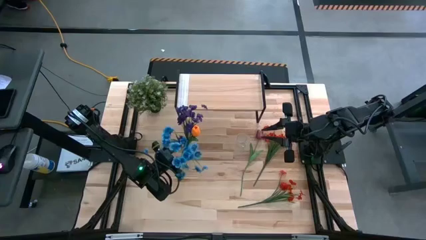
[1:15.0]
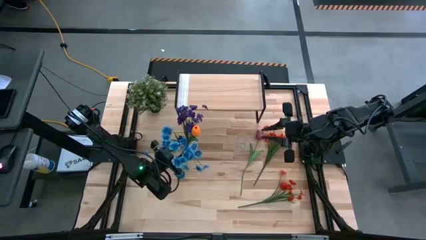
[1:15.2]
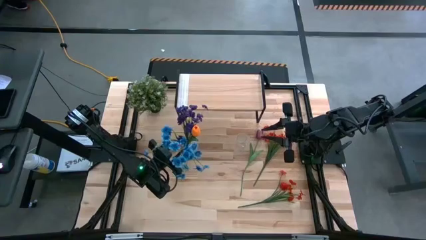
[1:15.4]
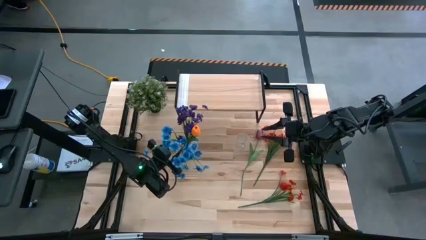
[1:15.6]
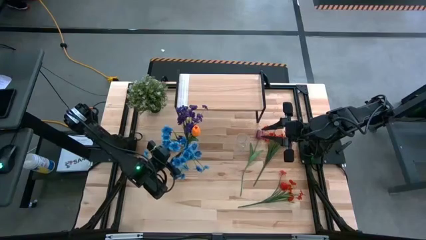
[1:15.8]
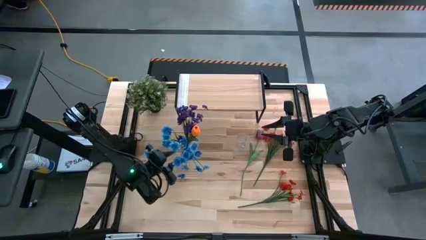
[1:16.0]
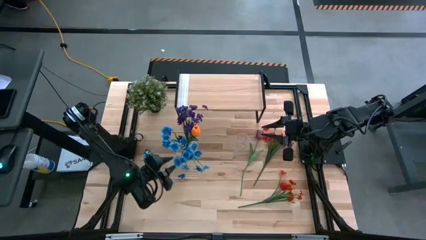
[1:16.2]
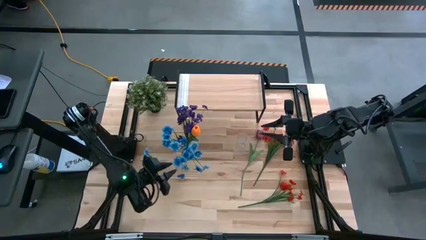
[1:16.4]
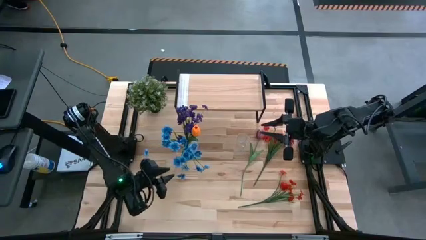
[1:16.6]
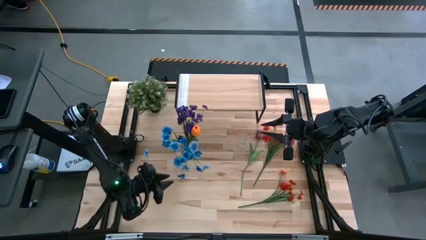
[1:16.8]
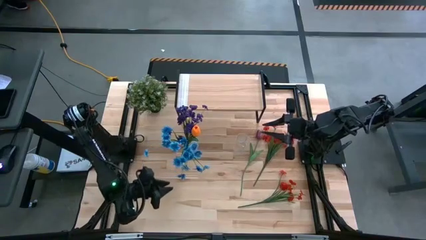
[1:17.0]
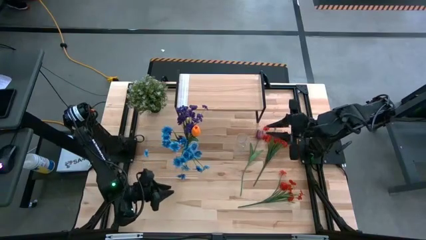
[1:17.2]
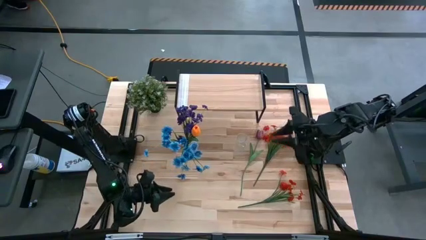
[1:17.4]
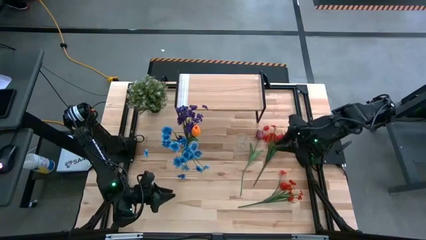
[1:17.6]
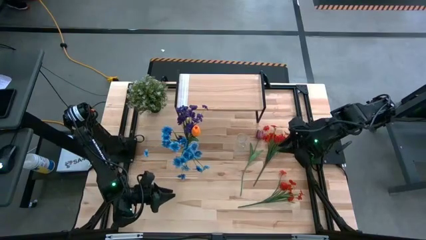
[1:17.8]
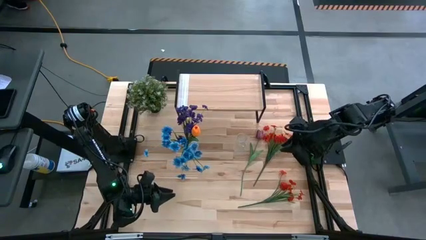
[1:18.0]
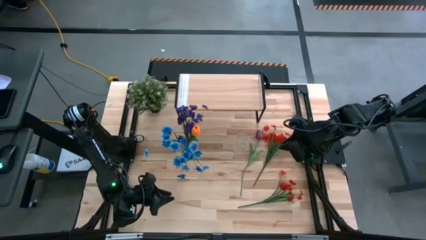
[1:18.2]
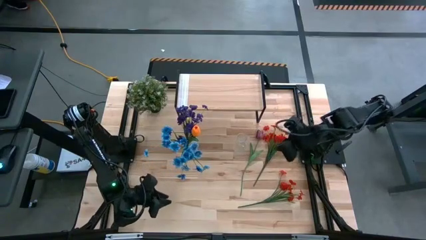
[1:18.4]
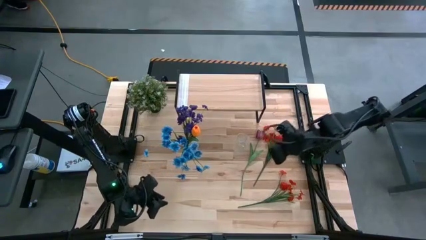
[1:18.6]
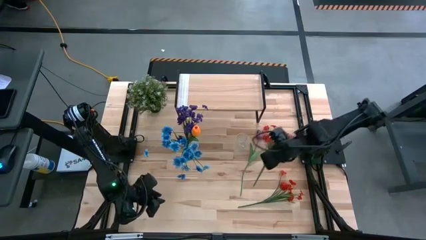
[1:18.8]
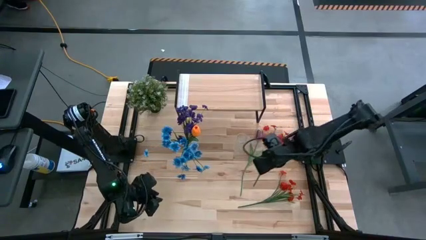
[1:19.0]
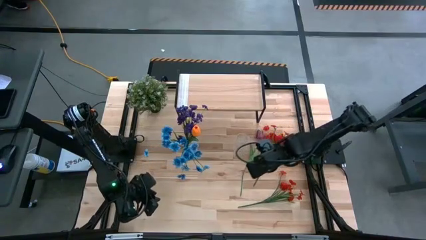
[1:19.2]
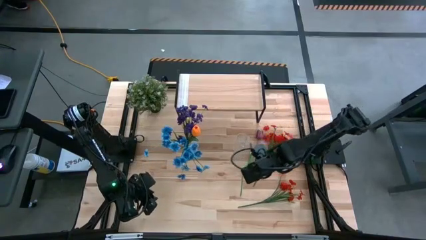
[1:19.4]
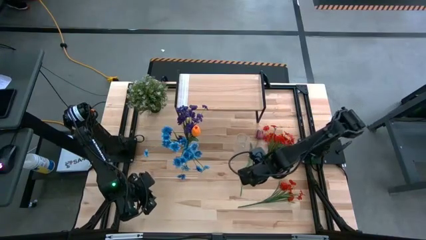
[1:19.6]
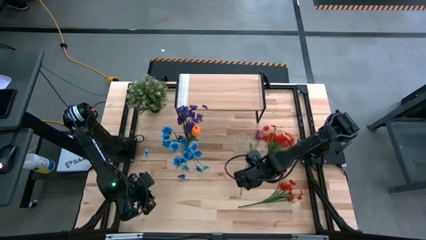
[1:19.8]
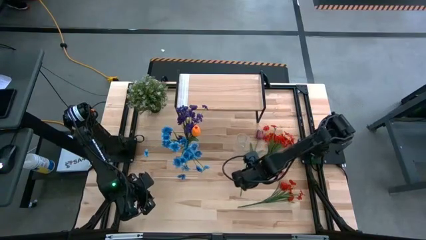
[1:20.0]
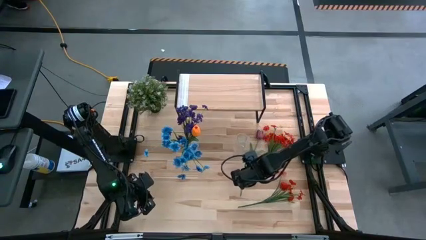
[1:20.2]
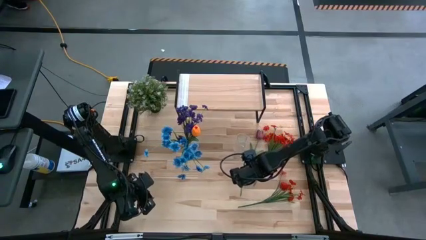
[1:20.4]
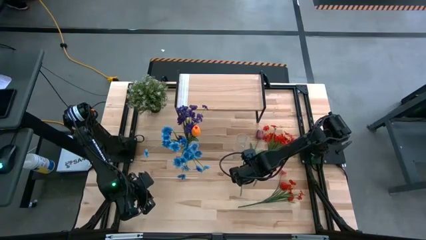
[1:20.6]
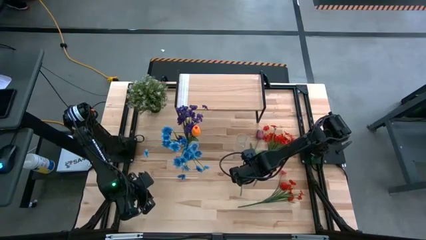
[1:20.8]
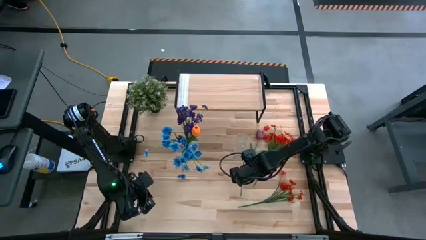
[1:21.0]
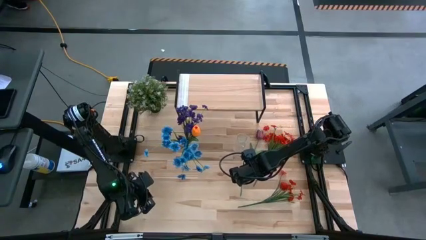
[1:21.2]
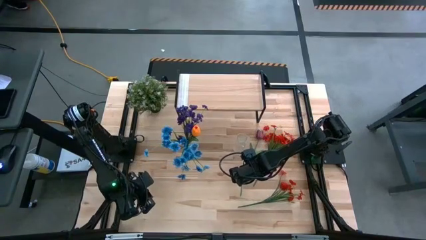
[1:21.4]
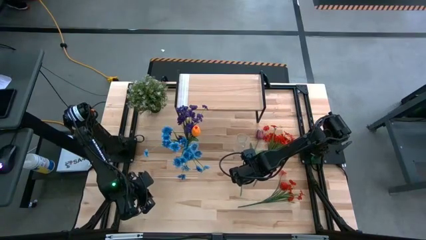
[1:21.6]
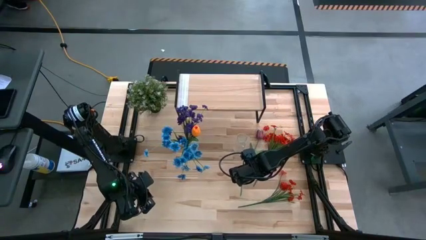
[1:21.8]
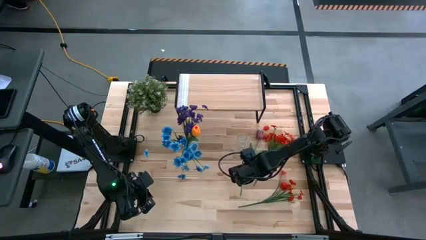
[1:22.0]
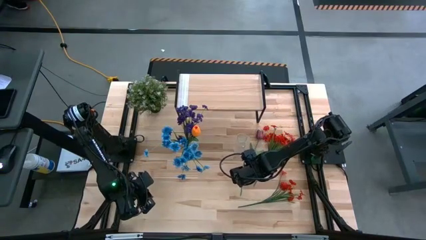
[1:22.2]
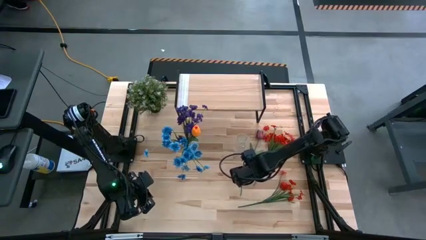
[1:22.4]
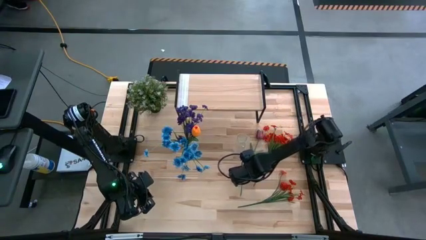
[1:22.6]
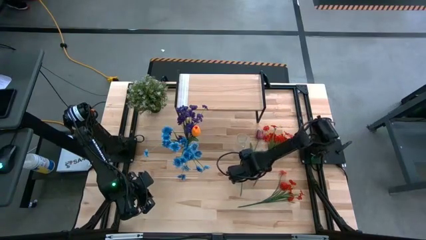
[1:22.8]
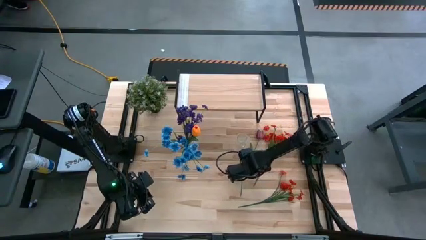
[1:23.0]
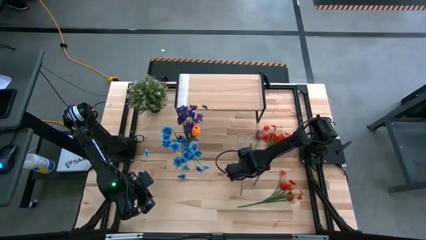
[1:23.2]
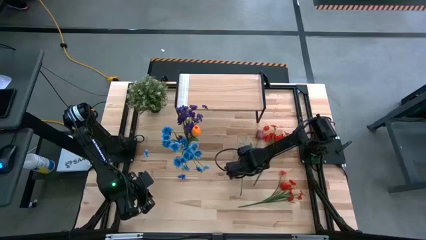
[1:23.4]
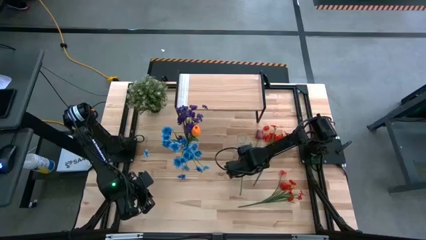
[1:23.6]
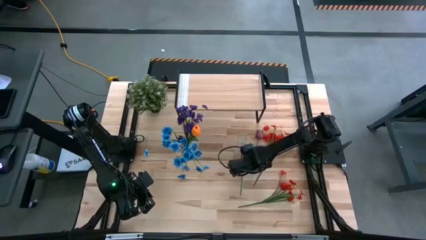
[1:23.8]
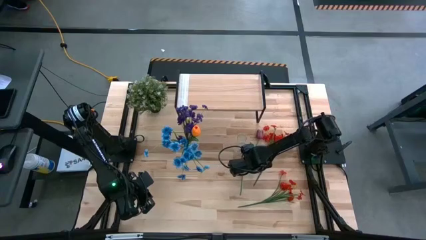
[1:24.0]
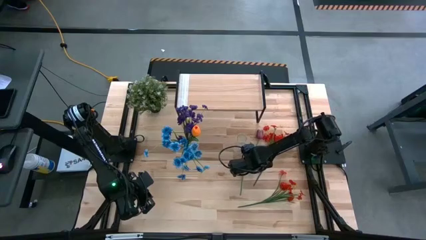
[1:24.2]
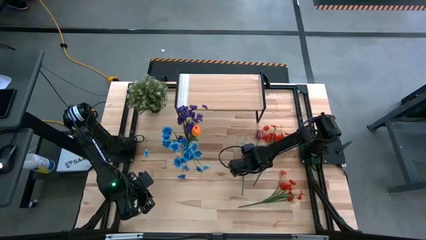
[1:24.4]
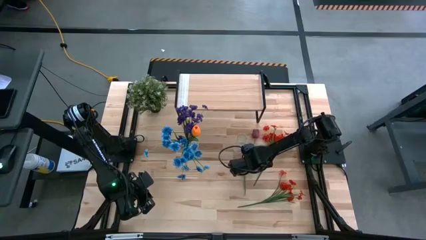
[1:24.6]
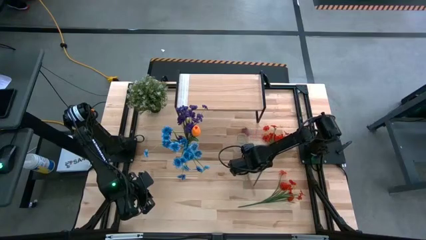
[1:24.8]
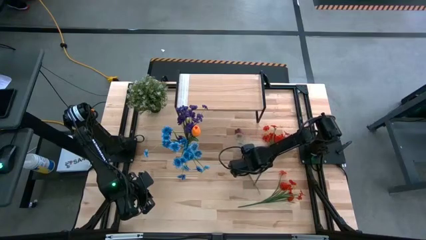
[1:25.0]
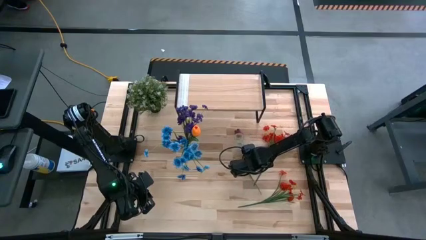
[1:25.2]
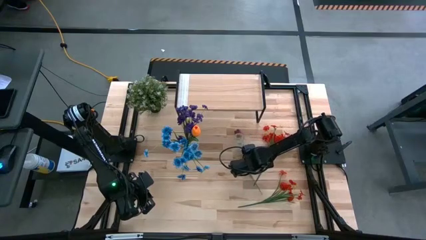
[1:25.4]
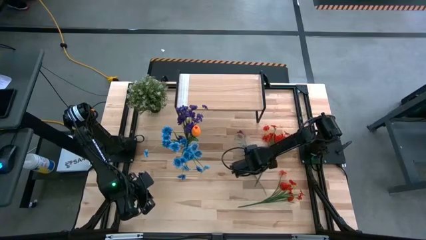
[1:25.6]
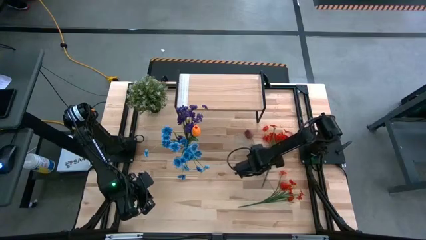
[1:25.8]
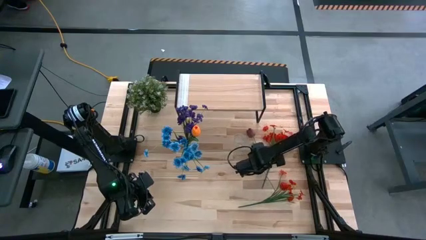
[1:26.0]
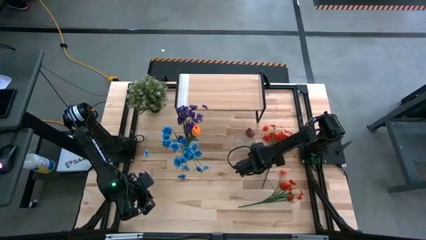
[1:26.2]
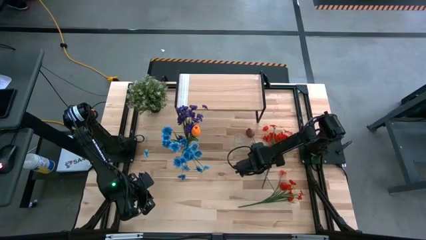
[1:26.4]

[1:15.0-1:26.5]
Task: Pick and place flowers into a vace then onto a shelf
Put the red tulip into the right transparent vase
